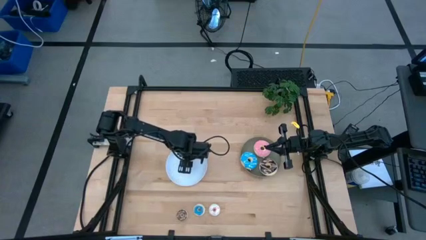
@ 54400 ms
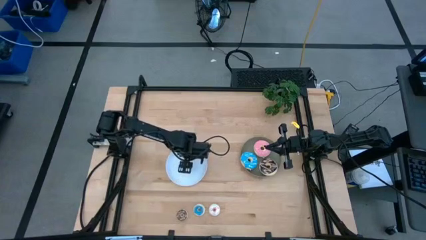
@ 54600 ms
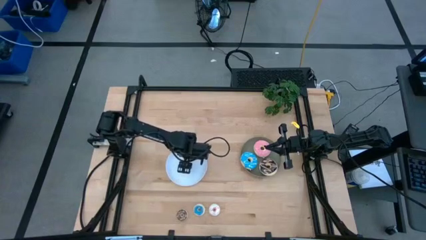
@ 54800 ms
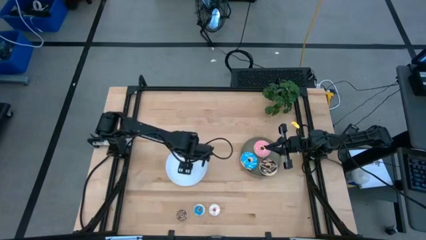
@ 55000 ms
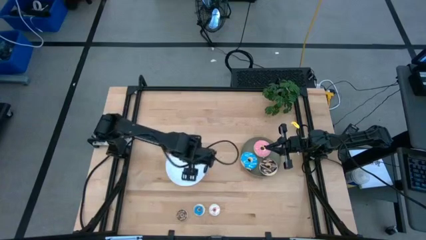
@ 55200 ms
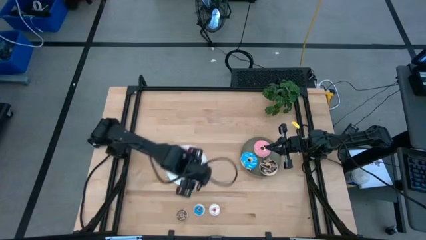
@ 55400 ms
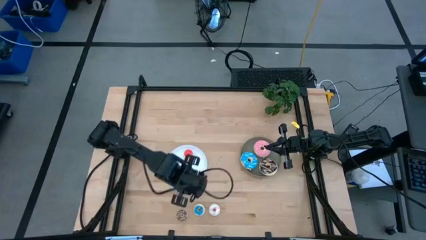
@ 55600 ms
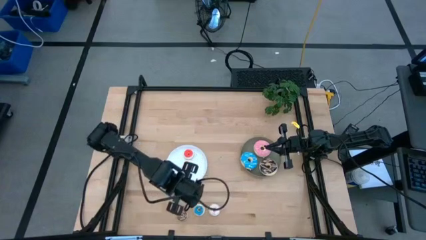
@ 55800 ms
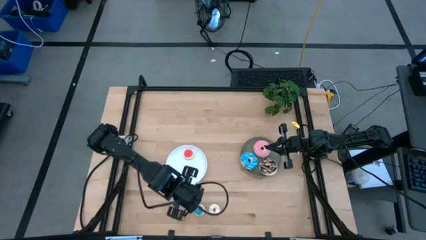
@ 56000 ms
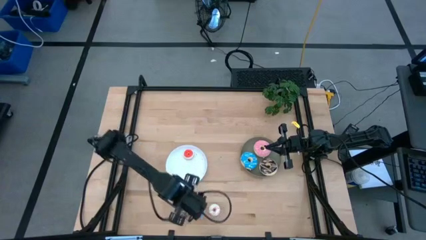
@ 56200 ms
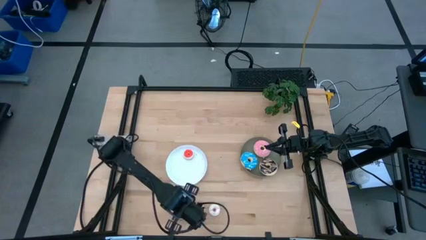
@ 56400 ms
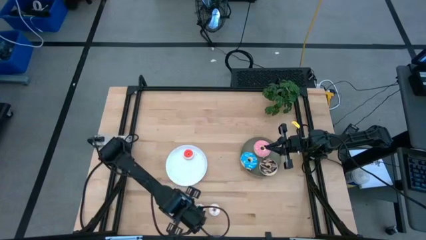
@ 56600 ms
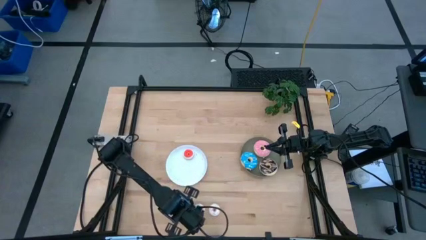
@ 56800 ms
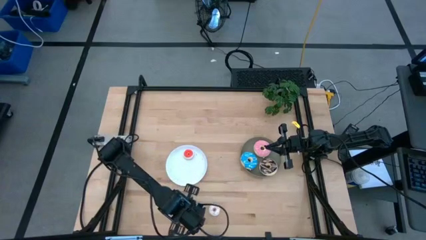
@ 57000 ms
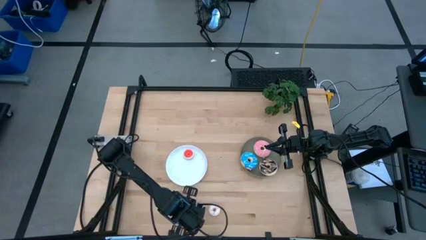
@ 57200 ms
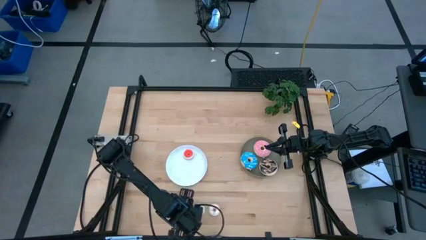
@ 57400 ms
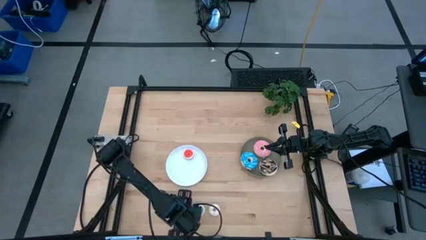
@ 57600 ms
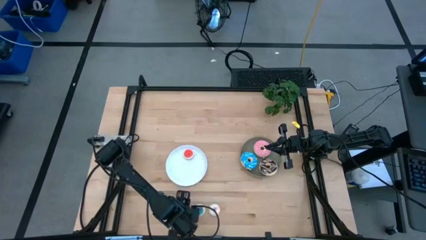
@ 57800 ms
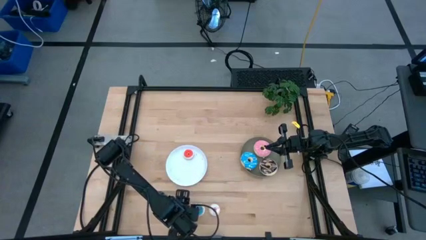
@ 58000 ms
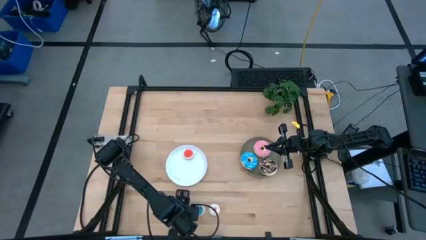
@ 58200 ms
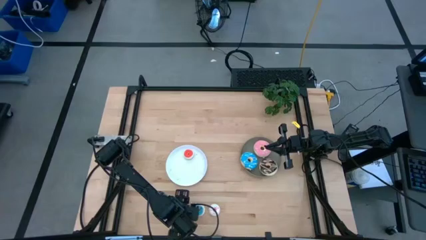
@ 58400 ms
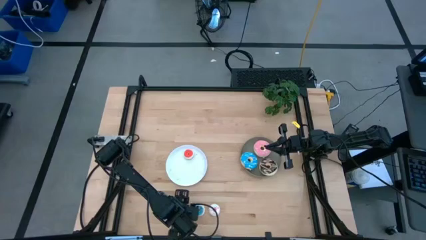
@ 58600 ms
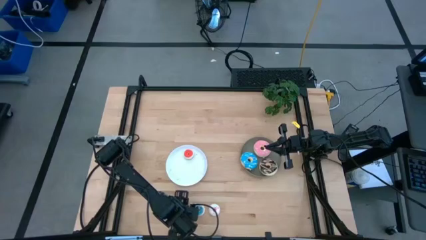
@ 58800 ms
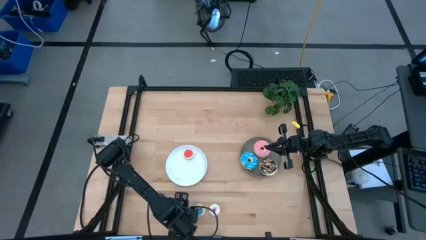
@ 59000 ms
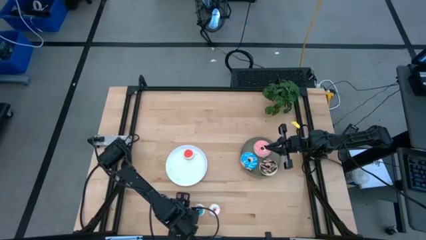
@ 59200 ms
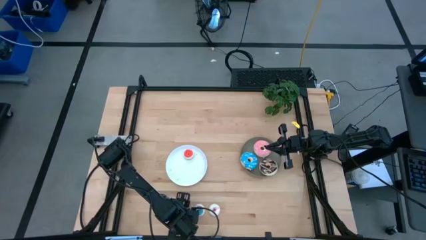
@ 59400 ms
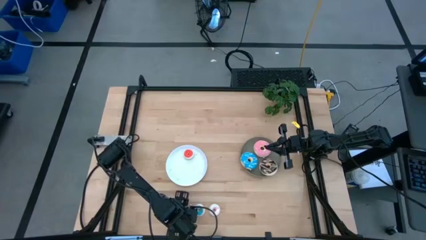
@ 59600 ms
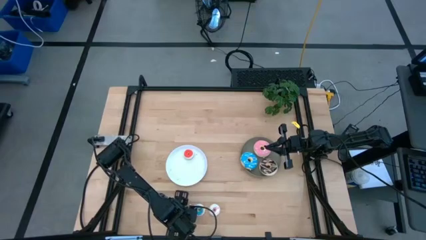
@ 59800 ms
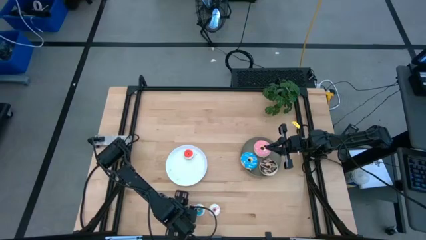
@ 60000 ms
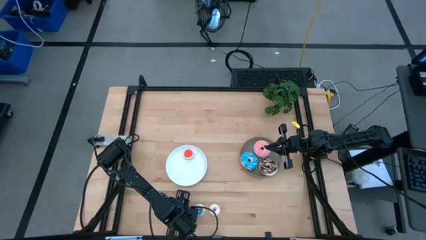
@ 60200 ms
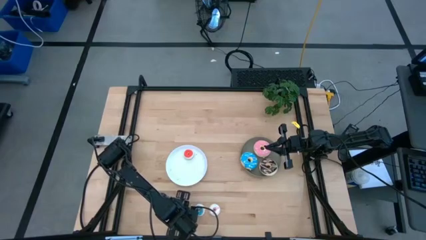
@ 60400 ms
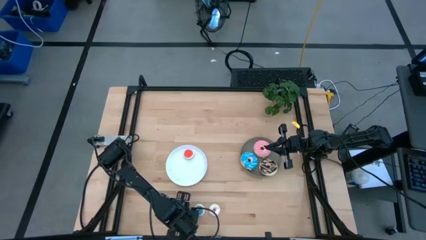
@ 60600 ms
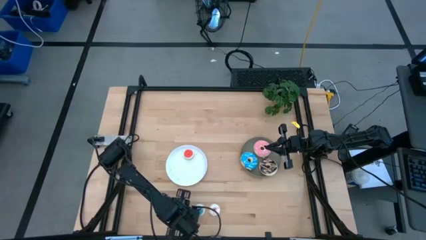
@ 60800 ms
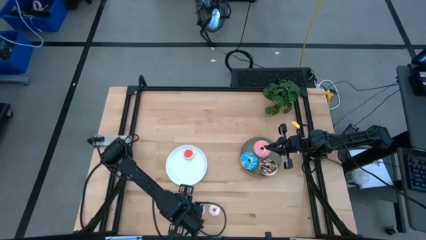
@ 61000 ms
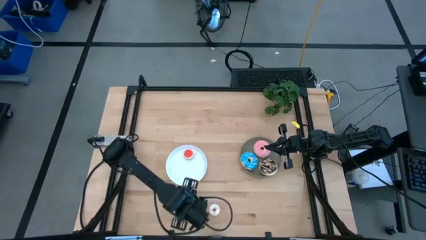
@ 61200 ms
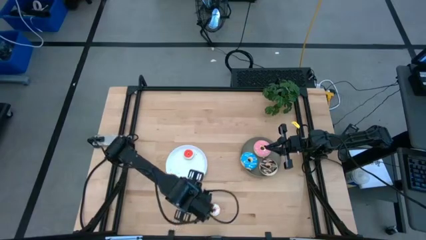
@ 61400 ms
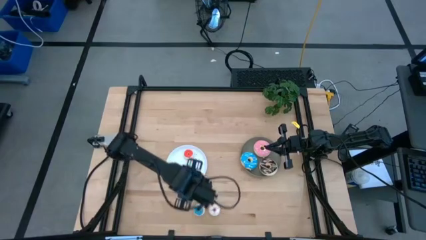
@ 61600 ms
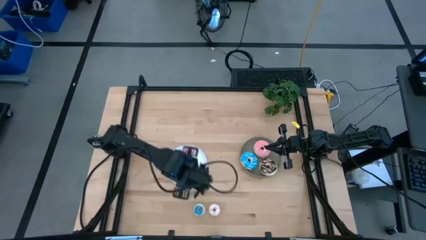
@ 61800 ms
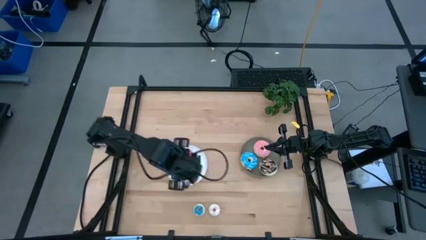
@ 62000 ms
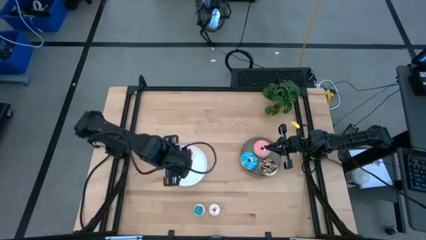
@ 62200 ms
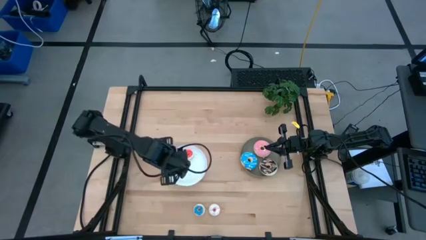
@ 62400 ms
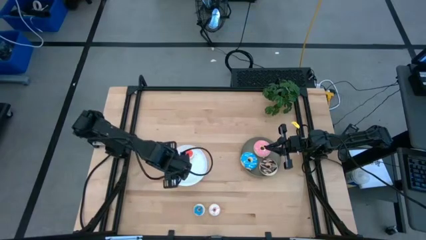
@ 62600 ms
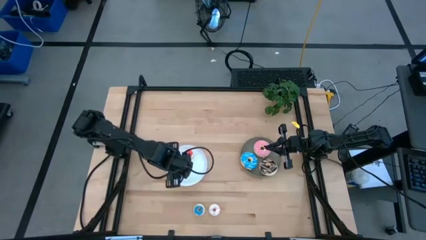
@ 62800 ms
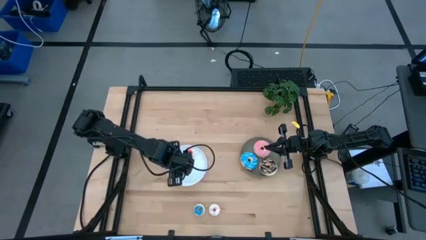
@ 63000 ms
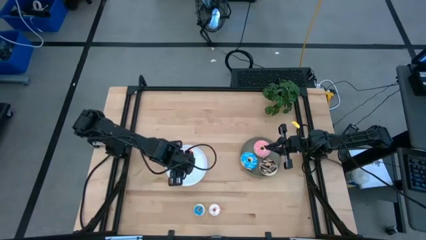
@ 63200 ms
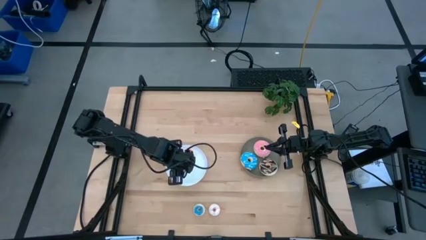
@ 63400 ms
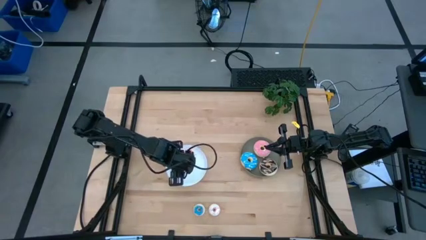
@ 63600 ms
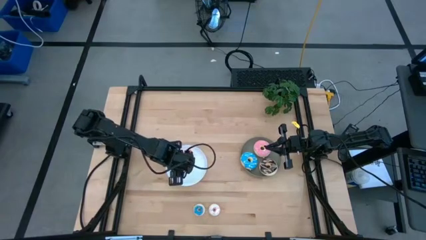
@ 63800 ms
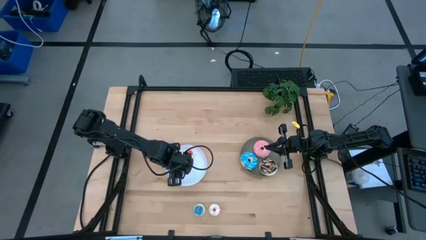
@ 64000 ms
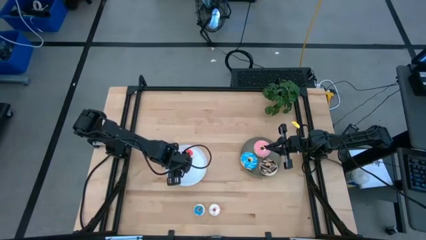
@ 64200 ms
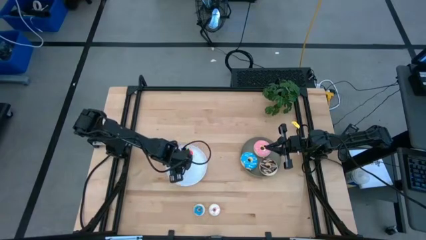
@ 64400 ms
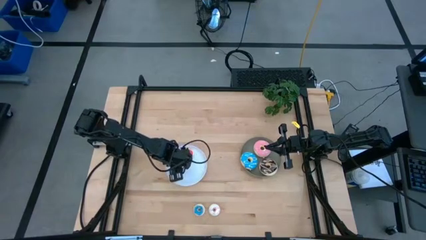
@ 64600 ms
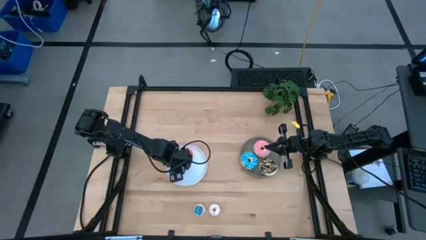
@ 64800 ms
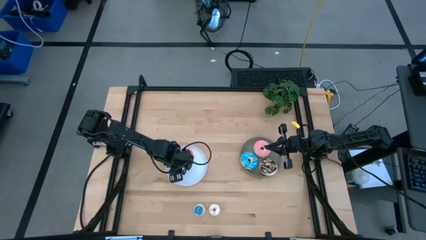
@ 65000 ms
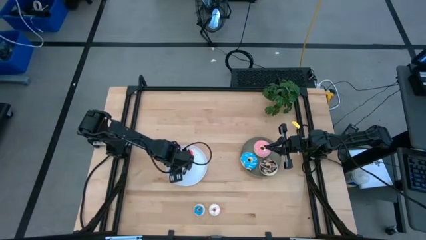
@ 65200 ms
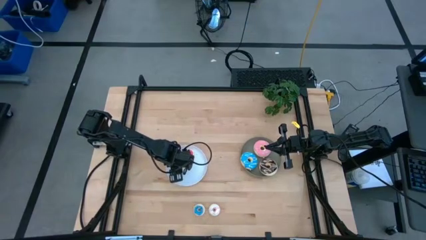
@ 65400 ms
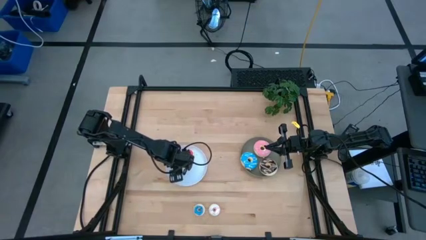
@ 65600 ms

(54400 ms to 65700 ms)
Task: Pick & Place donuts
Put the small brown donut on the white plate

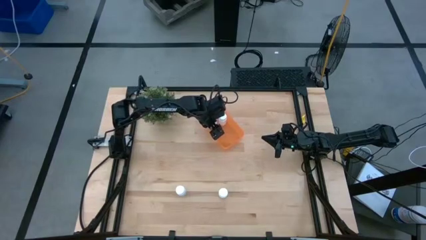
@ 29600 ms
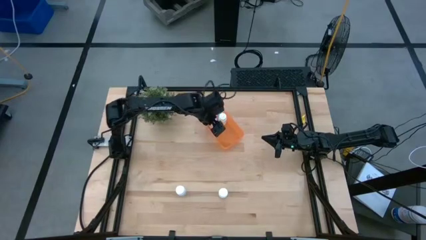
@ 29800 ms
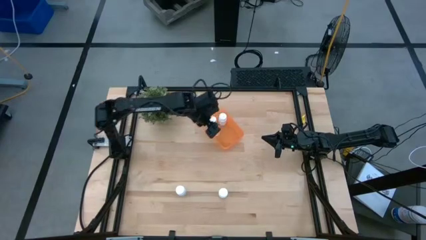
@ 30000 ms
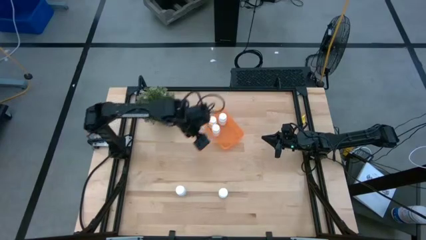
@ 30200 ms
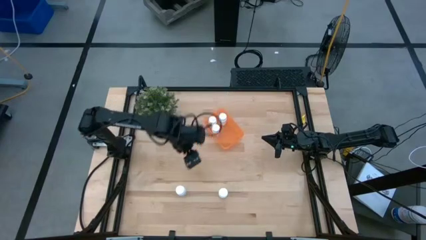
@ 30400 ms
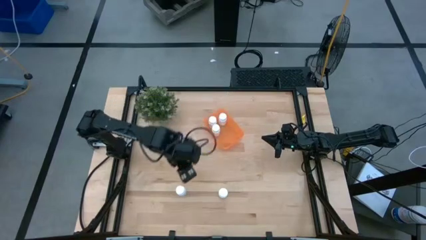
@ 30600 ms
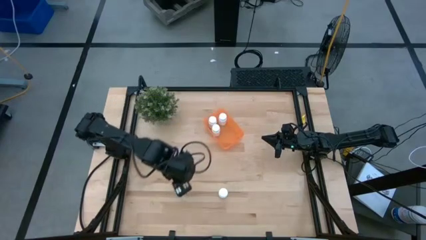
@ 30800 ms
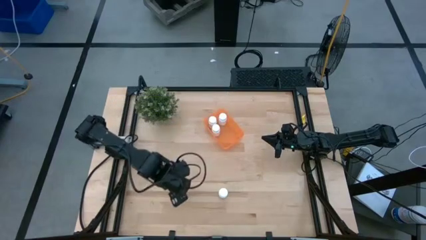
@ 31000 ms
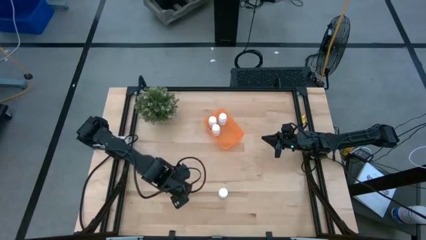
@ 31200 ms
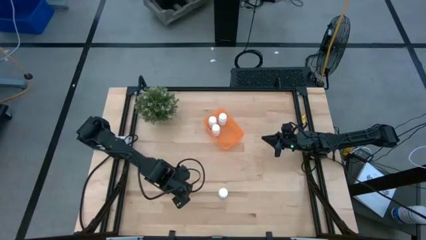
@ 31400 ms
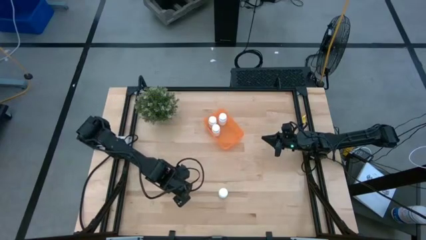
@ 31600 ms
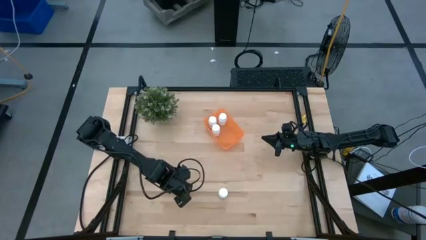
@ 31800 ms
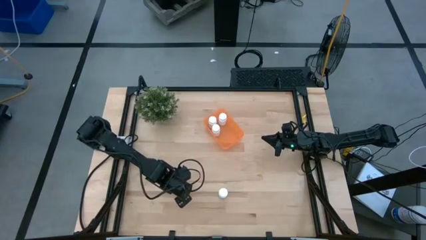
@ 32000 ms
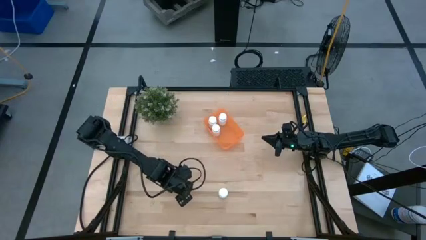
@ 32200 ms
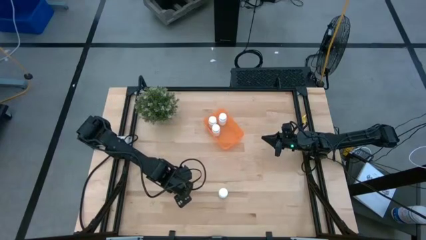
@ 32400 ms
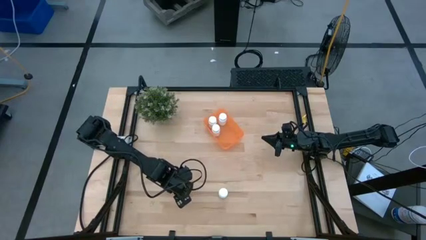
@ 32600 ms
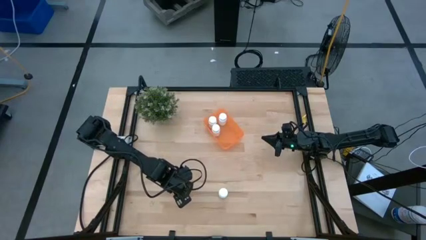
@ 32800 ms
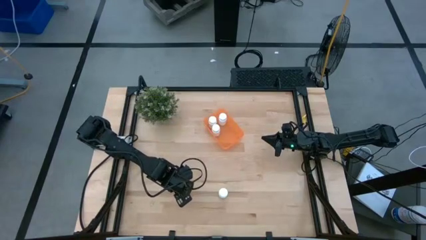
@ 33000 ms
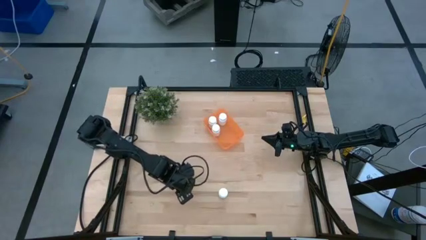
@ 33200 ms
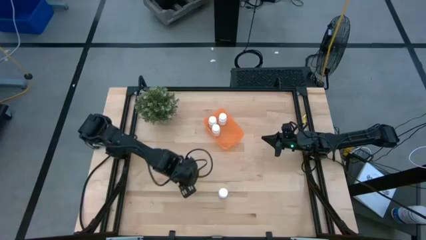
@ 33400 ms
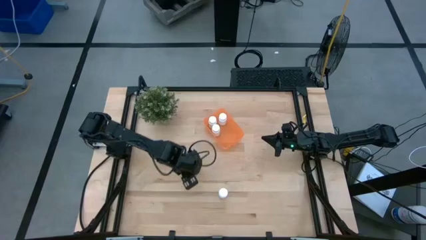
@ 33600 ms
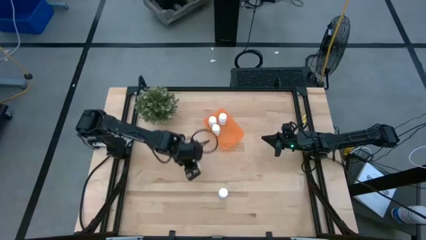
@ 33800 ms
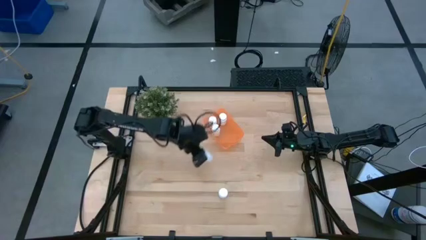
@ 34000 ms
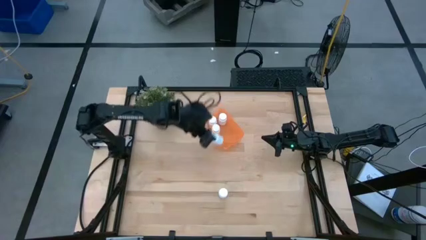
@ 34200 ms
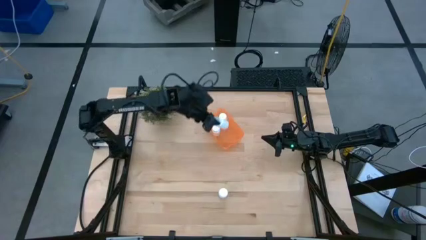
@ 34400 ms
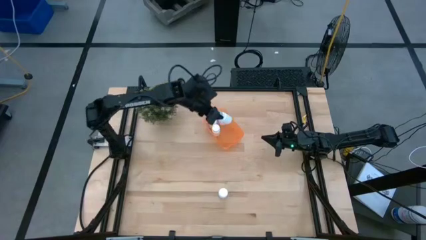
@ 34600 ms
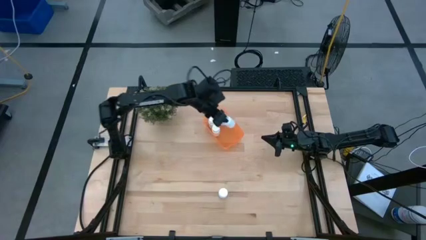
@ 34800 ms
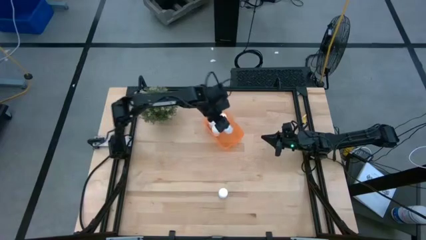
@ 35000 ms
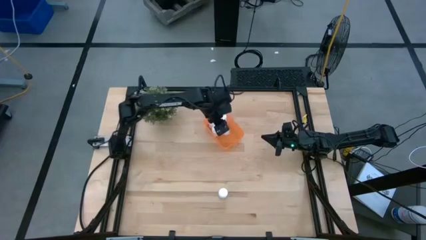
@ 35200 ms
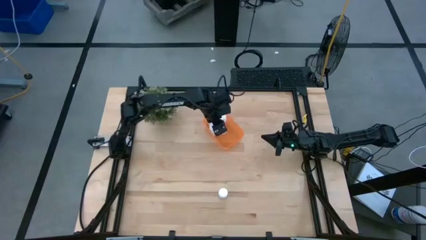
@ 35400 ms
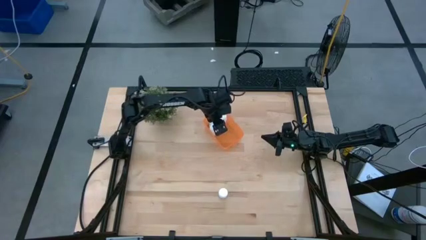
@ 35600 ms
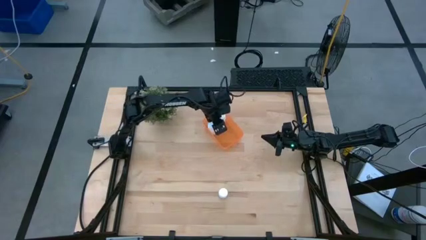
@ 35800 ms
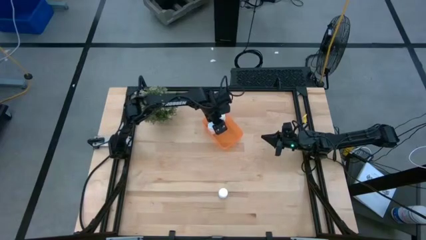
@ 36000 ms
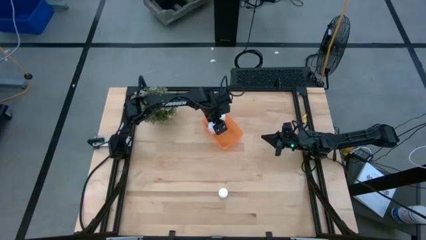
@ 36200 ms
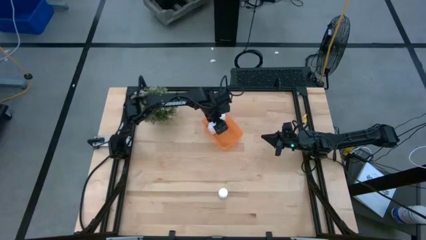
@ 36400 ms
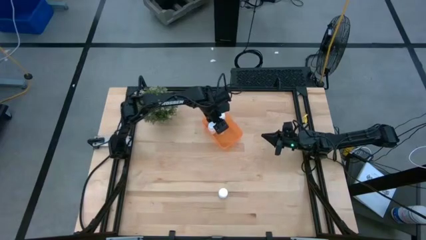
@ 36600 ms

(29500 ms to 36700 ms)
Task: Pick and place pill bottles into a basket
Put the white pill bottle into the orange bin
